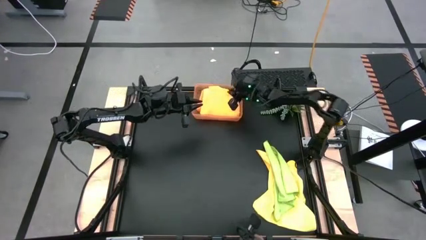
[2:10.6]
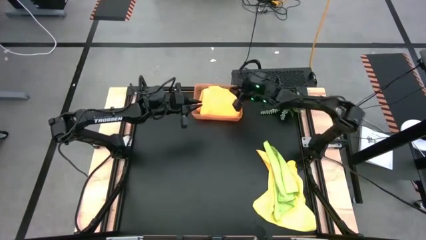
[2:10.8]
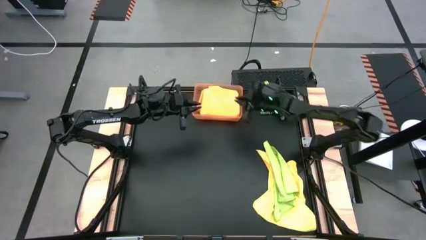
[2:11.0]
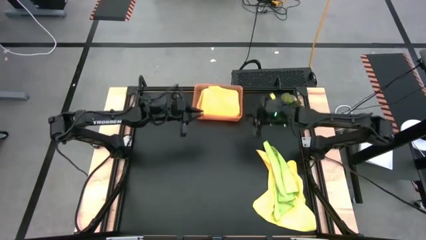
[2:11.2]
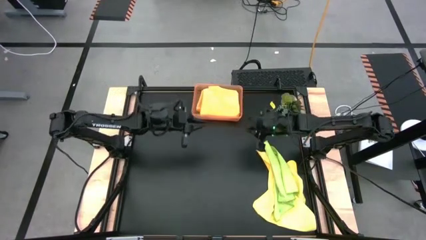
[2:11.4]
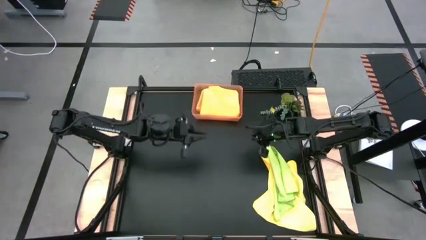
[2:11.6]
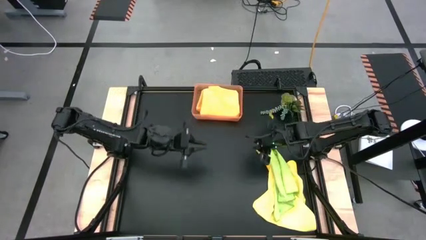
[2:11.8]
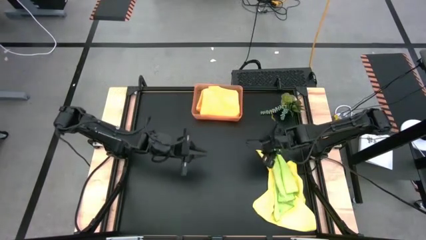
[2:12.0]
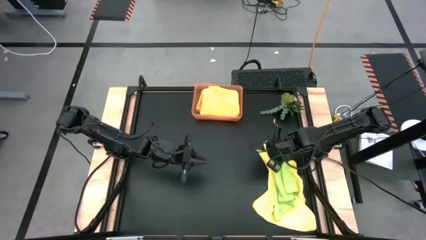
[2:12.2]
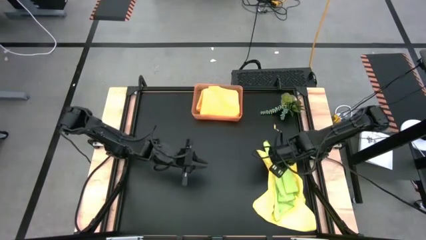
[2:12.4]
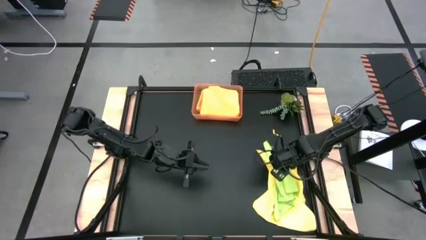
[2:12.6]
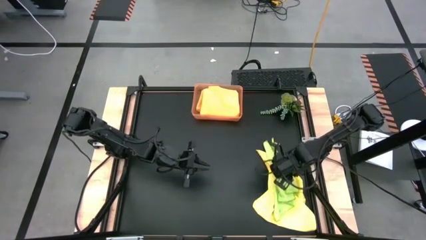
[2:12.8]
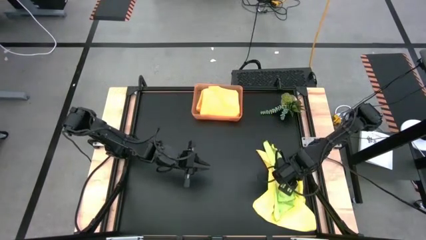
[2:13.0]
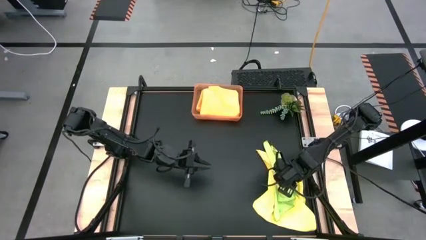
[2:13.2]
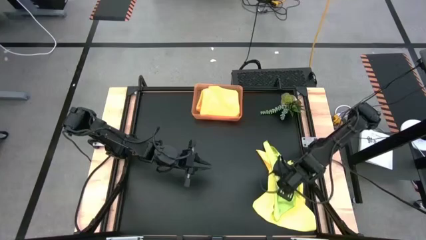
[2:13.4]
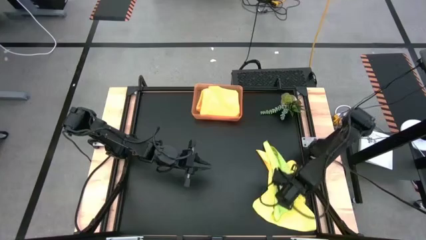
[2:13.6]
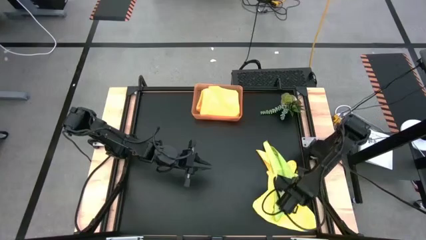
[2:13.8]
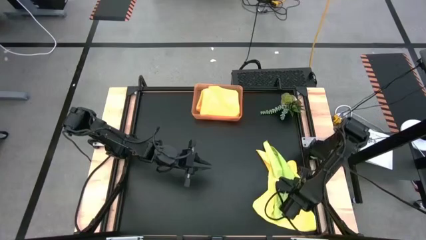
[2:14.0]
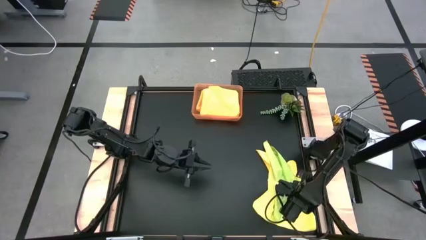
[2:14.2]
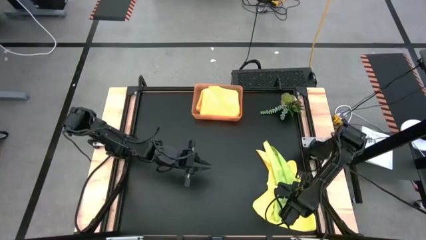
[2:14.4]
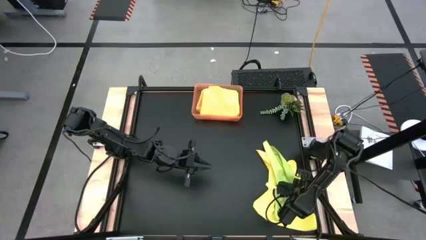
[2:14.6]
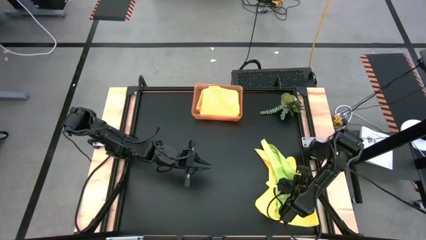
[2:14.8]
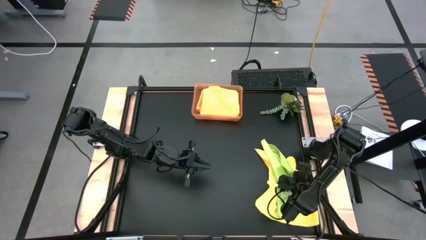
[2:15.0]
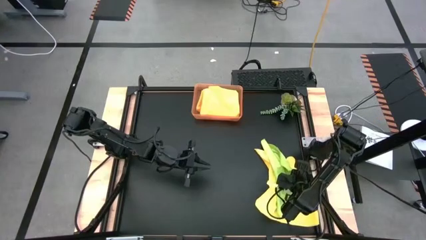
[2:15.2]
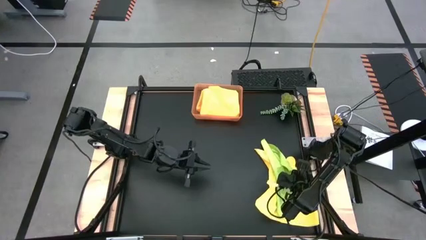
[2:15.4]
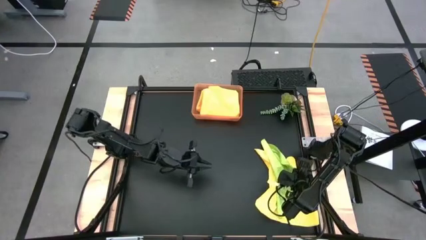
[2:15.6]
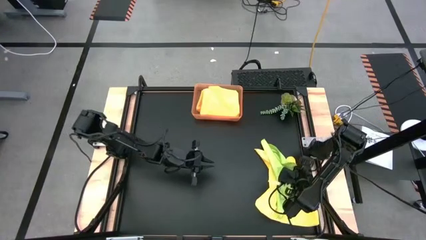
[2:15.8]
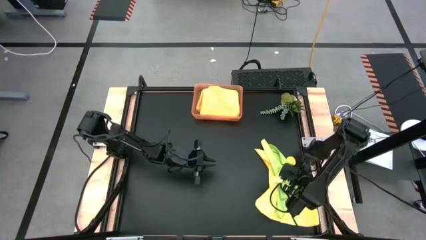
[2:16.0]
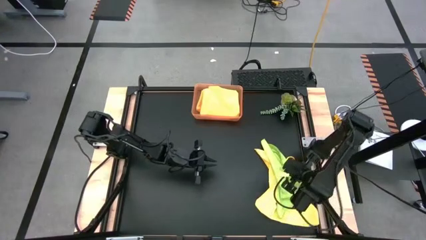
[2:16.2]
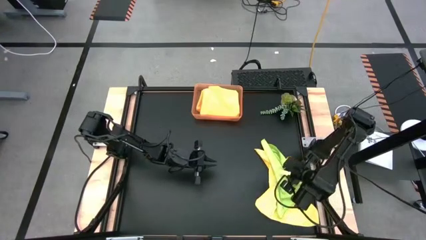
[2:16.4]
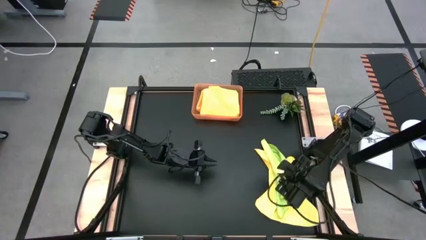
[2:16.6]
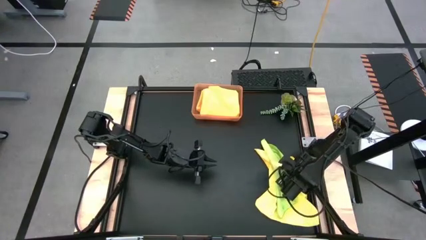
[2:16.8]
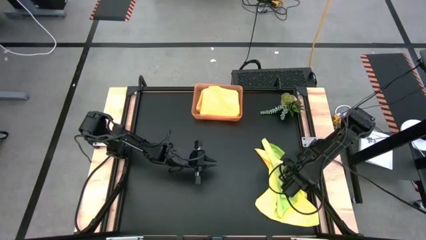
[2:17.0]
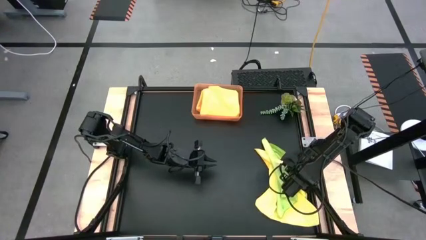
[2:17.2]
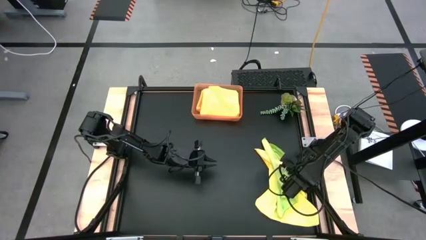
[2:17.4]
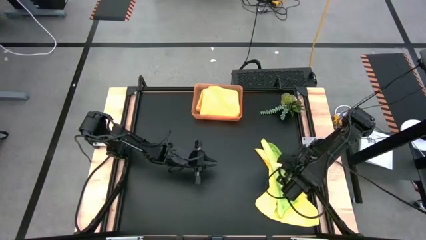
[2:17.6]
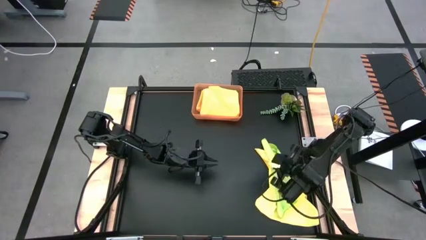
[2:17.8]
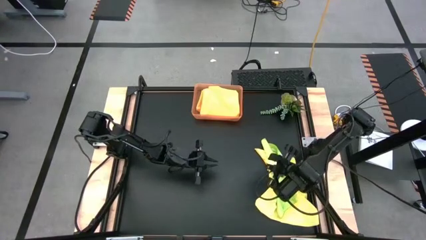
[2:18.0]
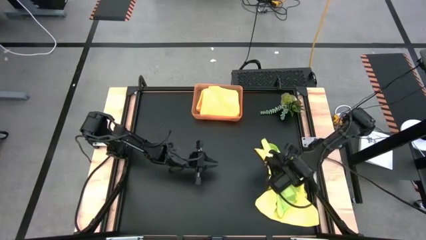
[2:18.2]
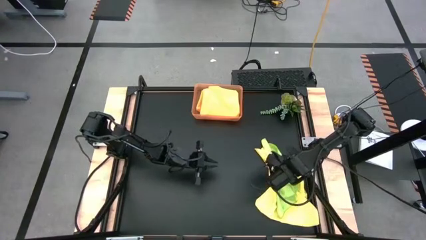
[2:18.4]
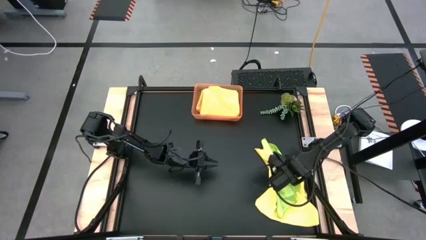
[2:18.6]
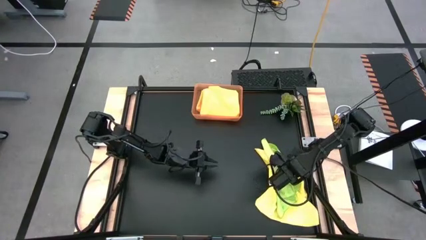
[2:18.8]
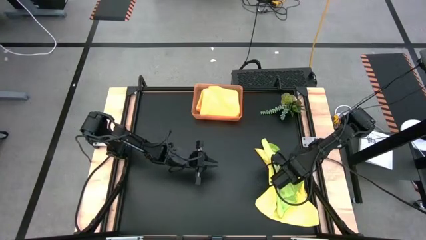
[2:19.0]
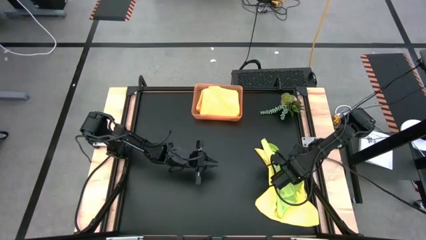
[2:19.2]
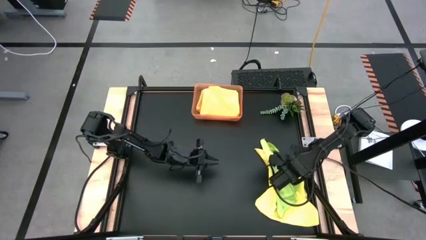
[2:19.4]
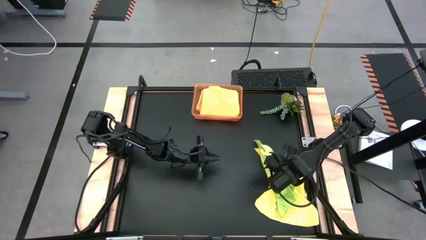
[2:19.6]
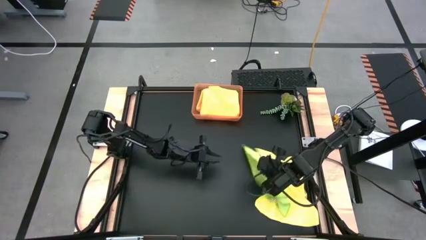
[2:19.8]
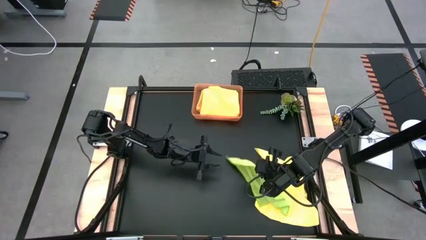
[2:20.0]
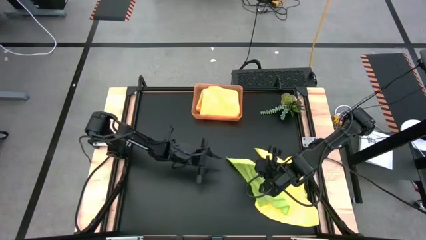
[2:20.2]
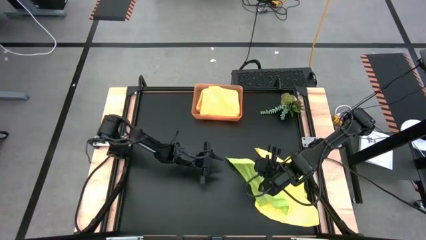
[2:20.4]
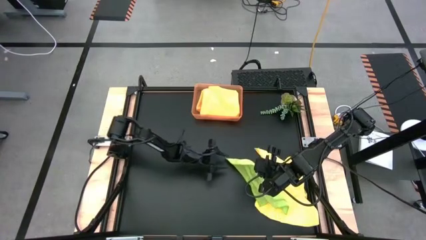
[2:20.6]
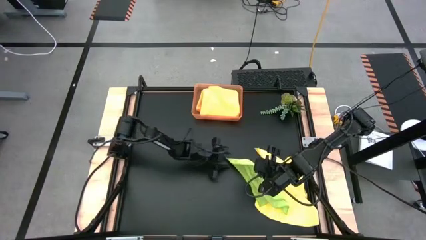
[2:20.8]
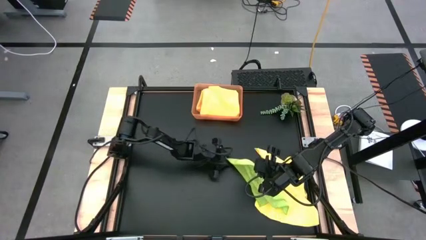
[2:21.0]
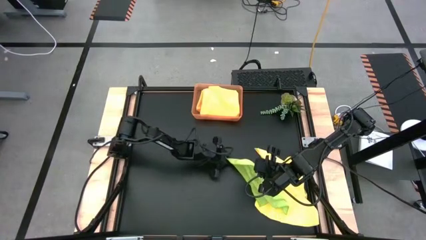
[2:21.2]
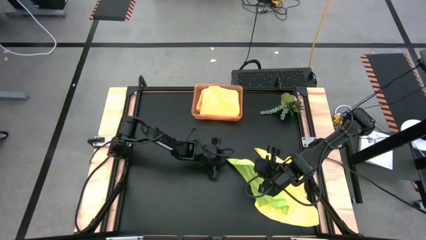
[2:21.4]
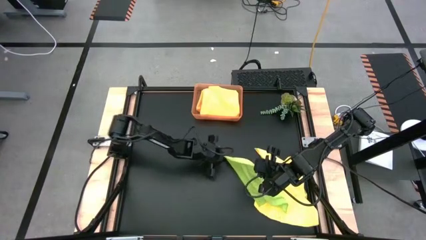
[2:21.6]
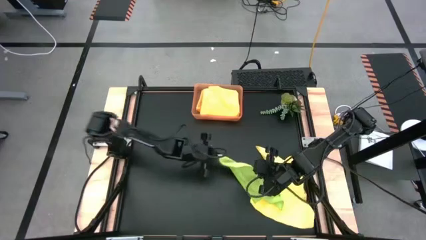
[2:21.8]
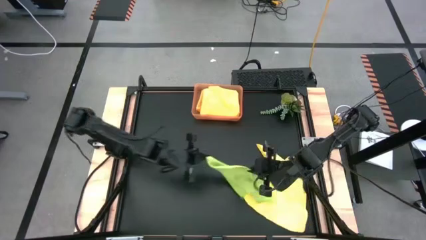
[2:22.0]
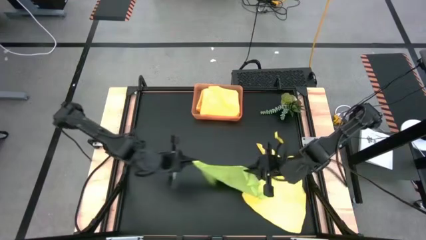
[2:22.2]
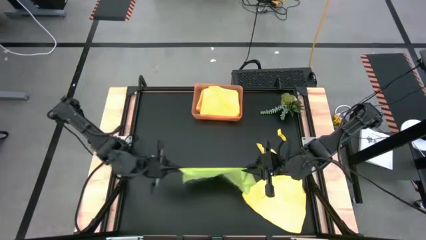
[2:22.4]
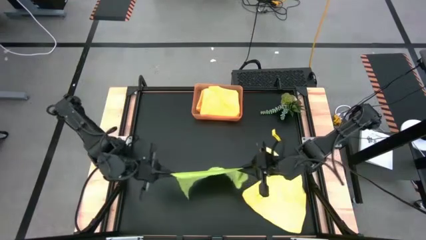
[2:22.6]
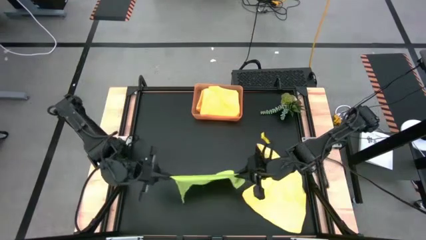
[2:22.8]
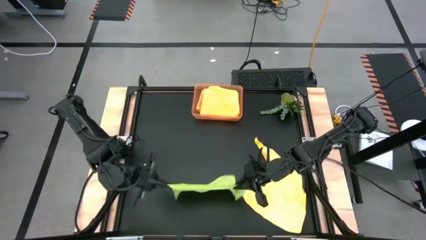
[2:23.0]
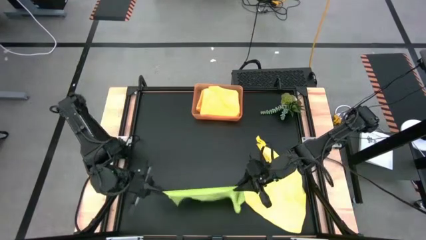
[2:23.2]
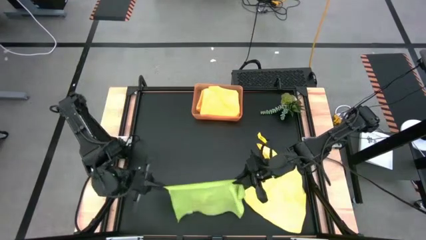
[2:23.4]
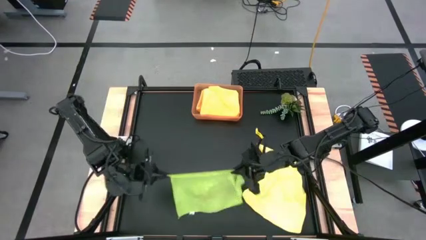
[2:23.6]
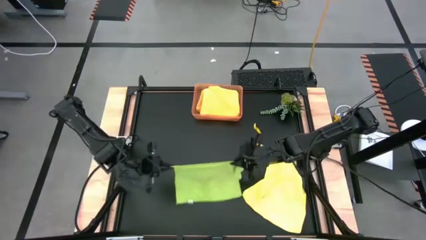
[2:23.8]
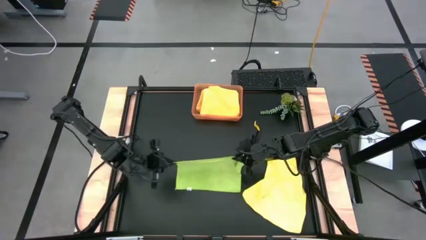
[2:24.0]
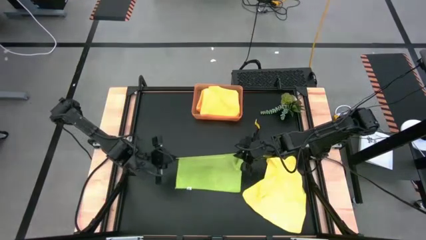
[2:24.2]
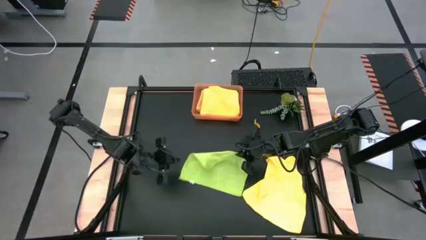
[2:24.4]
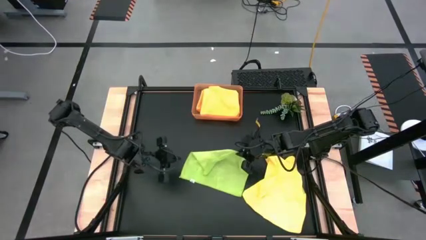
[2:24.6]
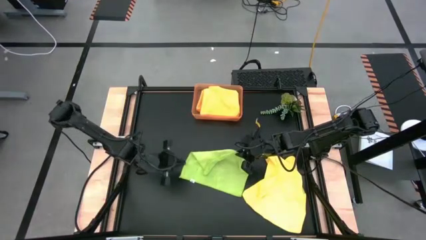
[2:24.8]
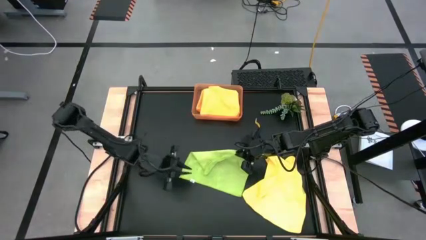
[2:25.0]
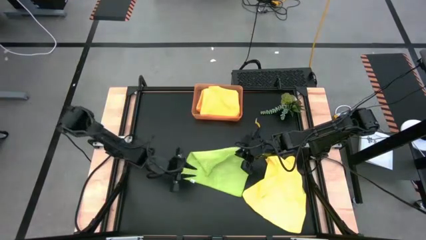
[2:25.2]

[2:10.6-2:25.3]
Task: Fold microfiber towels
Fold the green towel
